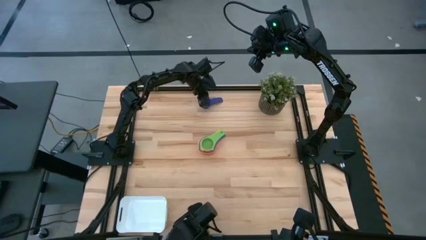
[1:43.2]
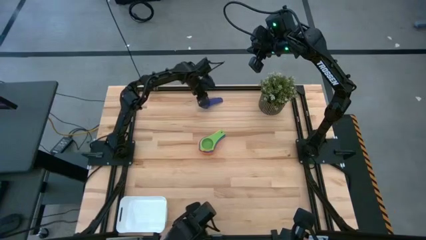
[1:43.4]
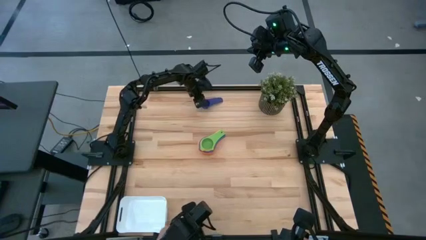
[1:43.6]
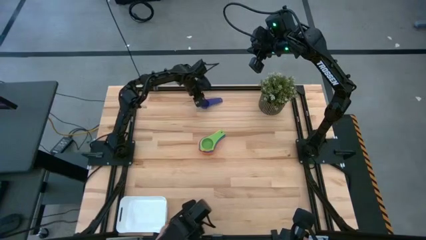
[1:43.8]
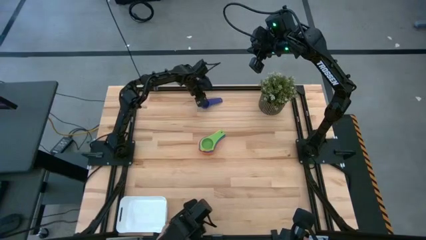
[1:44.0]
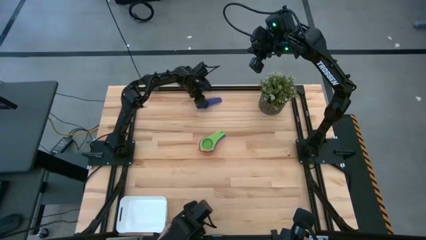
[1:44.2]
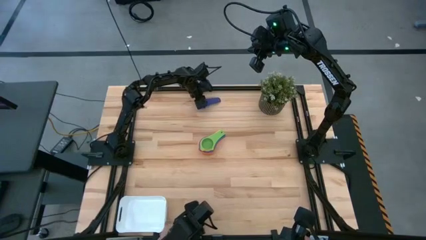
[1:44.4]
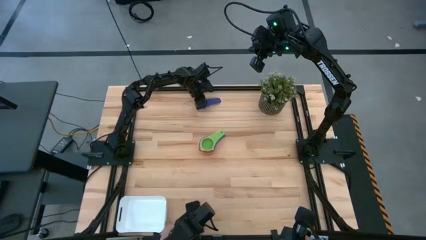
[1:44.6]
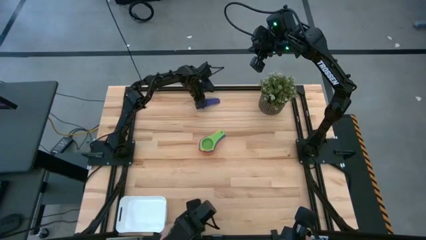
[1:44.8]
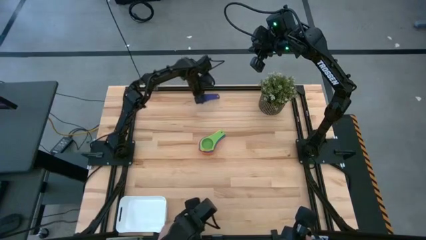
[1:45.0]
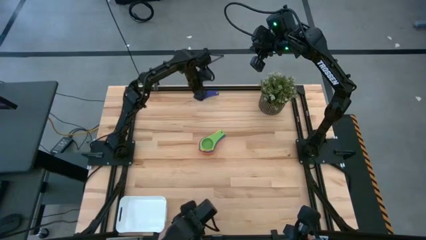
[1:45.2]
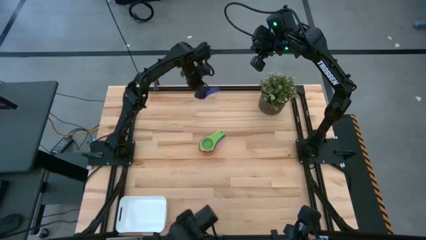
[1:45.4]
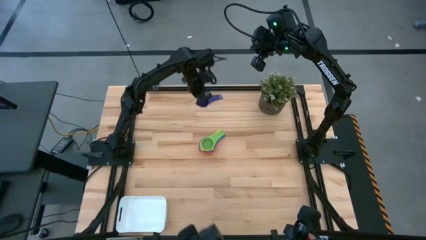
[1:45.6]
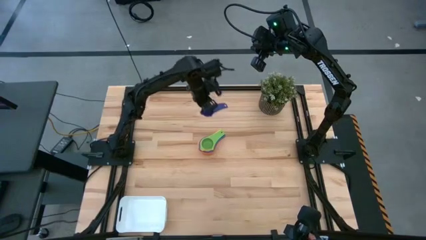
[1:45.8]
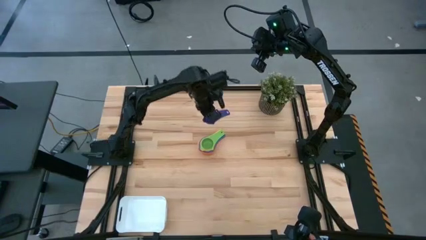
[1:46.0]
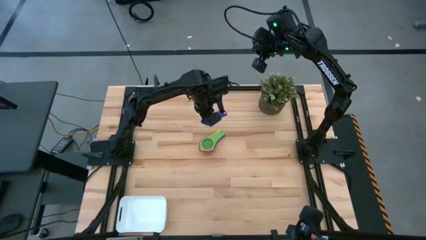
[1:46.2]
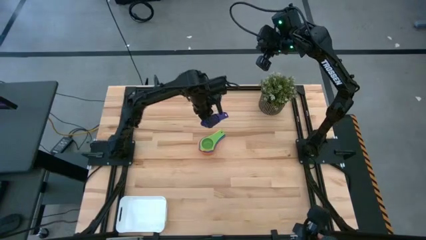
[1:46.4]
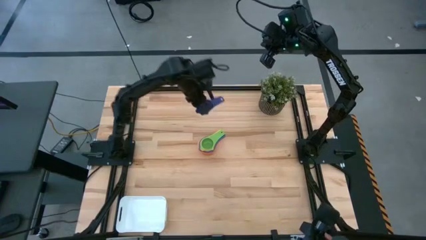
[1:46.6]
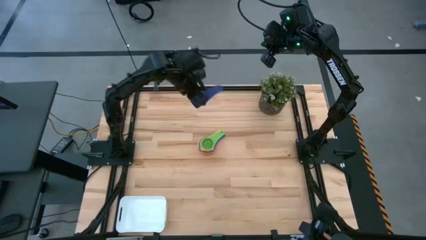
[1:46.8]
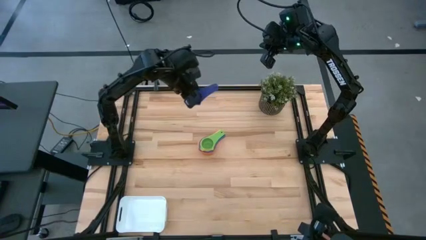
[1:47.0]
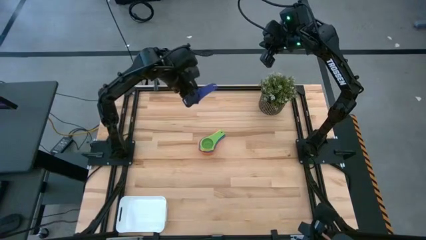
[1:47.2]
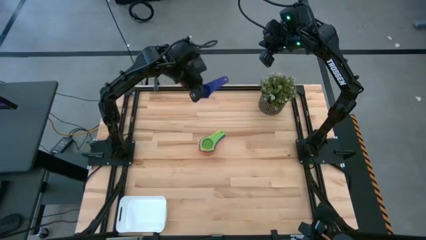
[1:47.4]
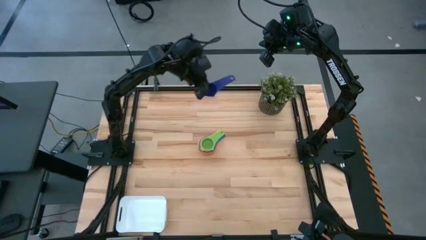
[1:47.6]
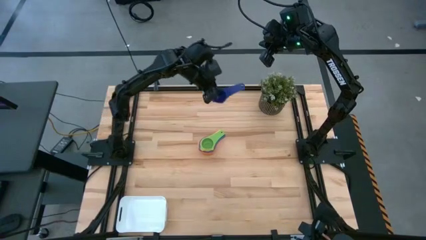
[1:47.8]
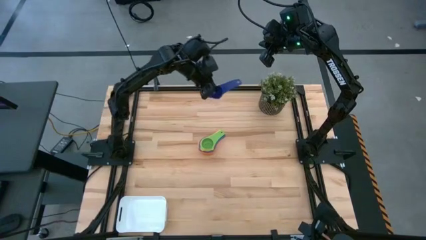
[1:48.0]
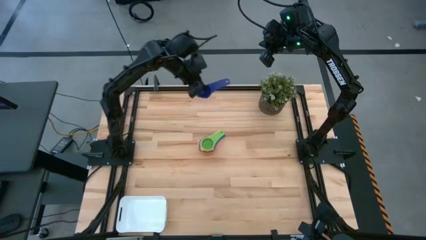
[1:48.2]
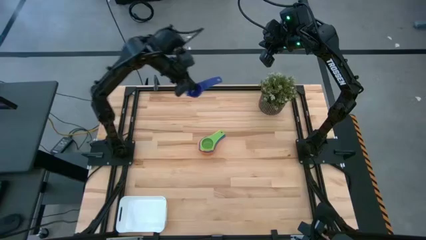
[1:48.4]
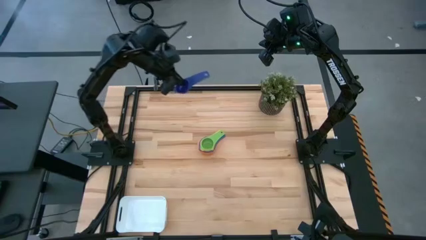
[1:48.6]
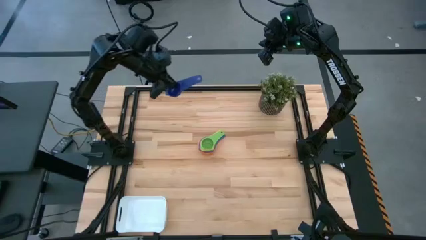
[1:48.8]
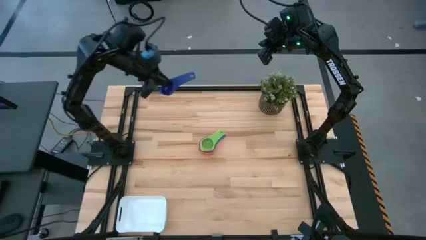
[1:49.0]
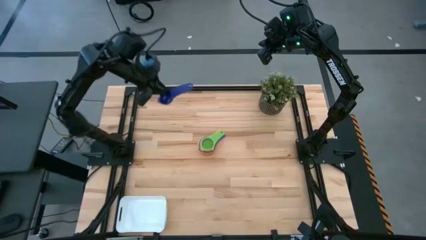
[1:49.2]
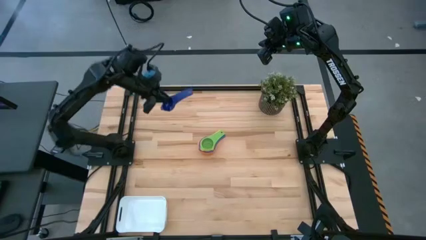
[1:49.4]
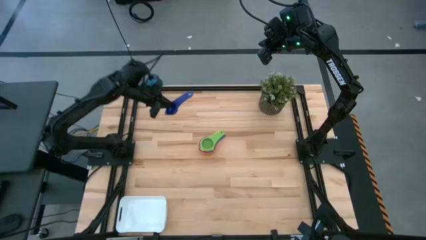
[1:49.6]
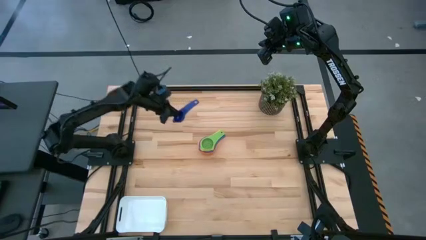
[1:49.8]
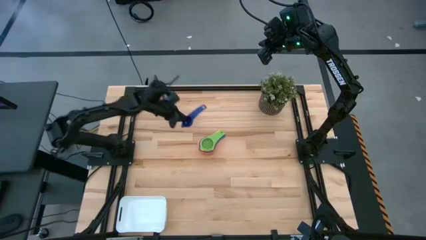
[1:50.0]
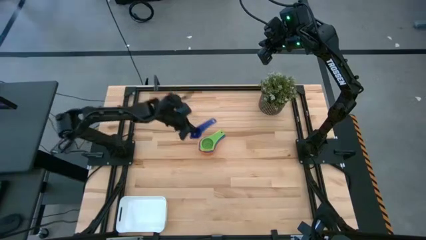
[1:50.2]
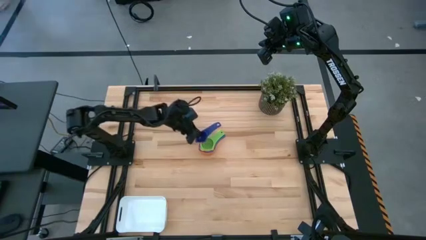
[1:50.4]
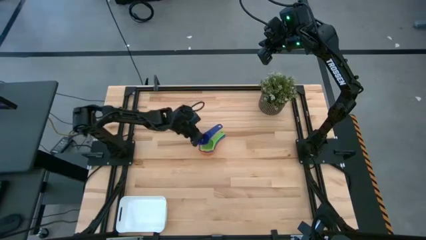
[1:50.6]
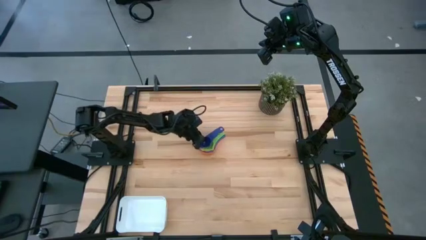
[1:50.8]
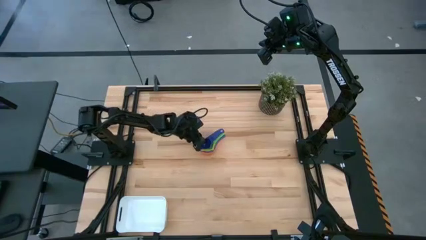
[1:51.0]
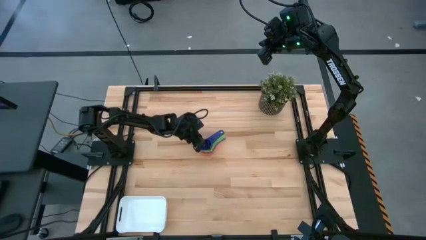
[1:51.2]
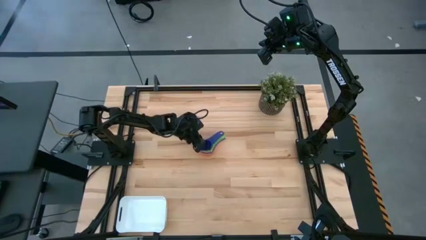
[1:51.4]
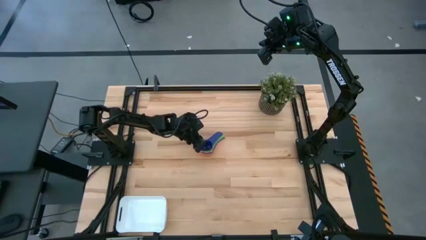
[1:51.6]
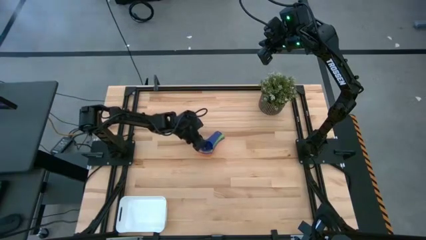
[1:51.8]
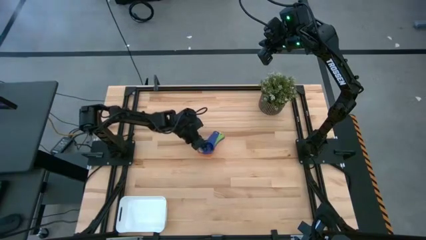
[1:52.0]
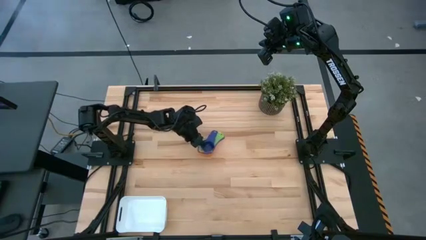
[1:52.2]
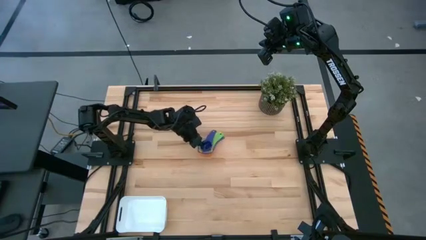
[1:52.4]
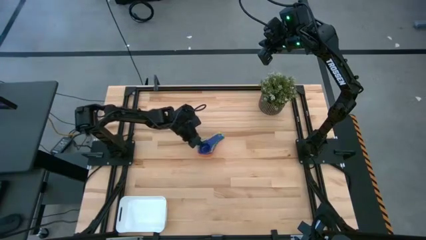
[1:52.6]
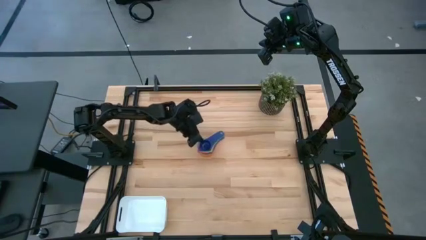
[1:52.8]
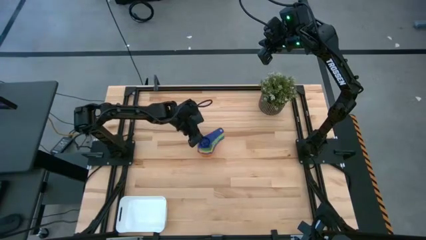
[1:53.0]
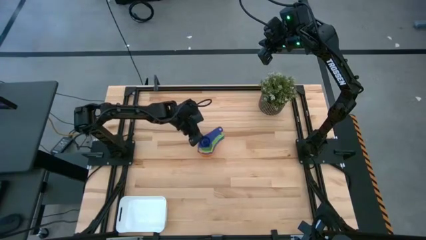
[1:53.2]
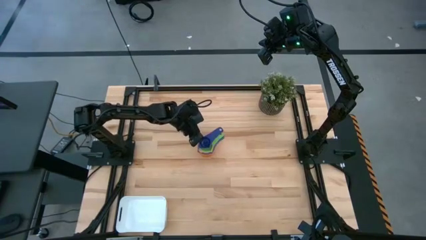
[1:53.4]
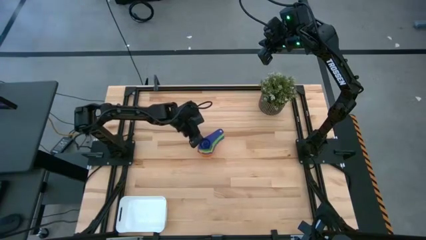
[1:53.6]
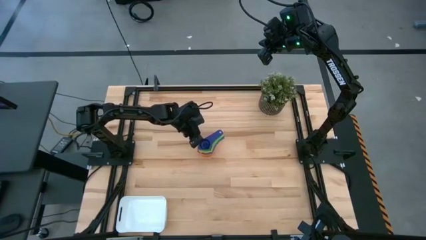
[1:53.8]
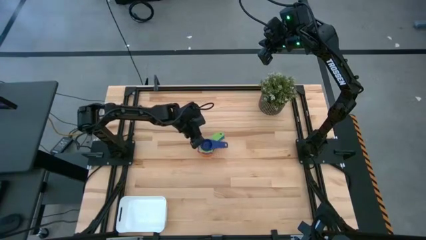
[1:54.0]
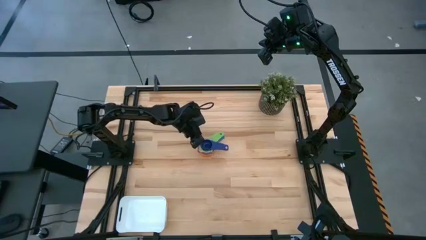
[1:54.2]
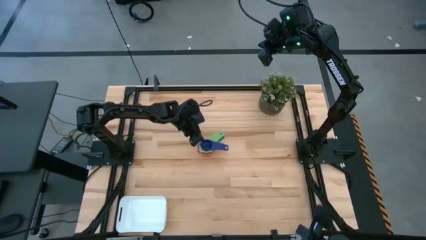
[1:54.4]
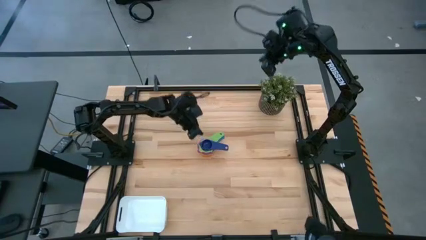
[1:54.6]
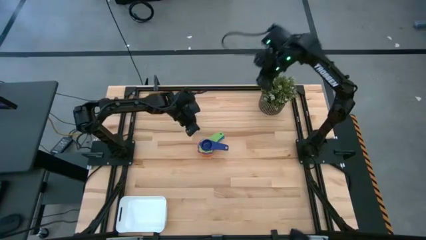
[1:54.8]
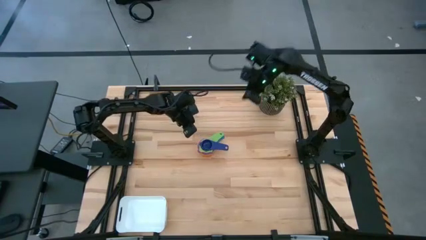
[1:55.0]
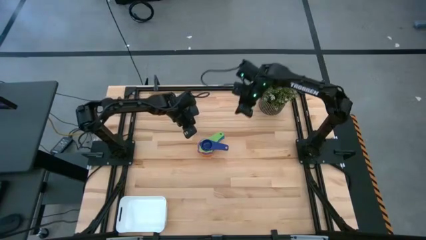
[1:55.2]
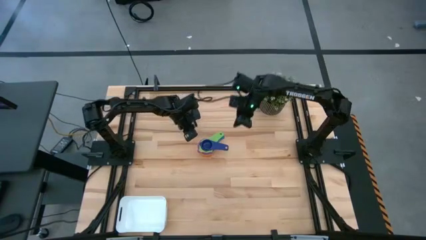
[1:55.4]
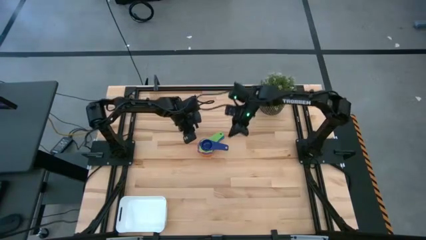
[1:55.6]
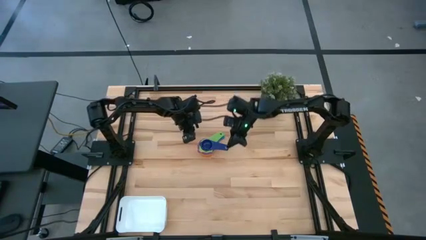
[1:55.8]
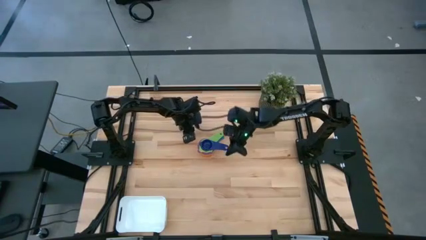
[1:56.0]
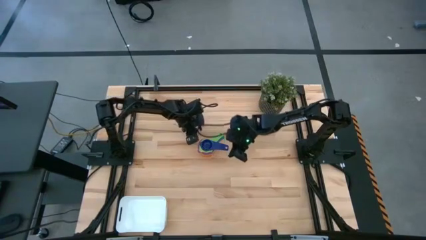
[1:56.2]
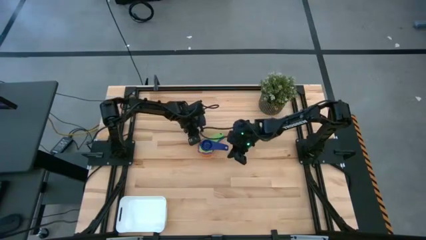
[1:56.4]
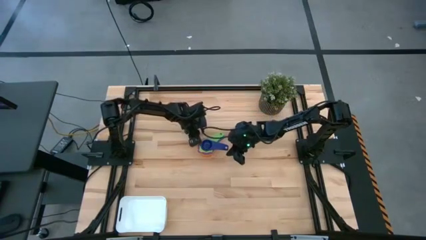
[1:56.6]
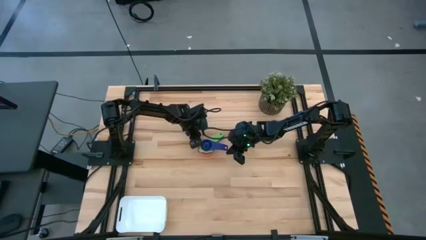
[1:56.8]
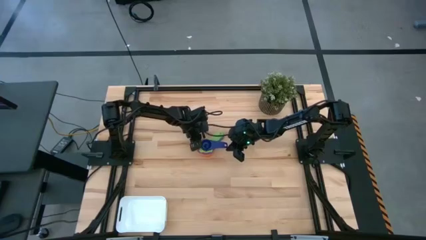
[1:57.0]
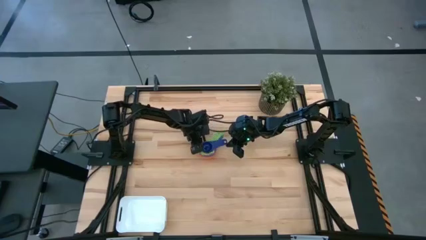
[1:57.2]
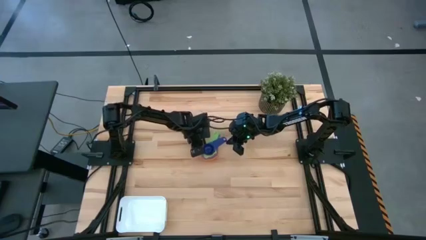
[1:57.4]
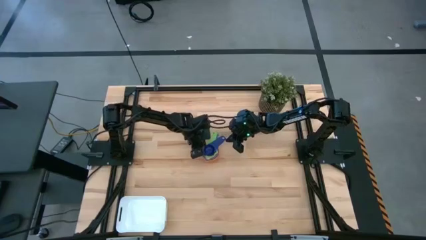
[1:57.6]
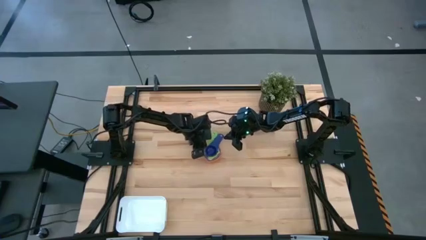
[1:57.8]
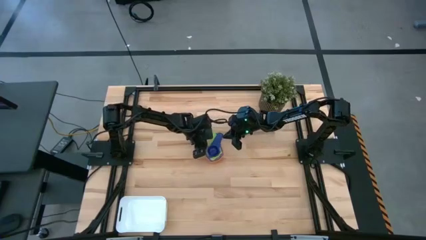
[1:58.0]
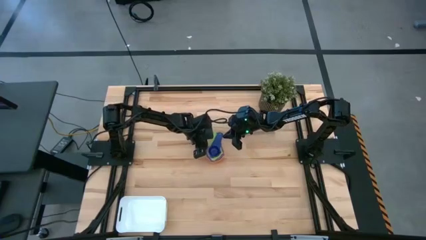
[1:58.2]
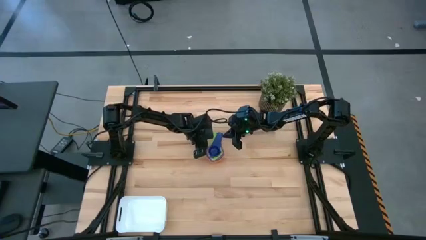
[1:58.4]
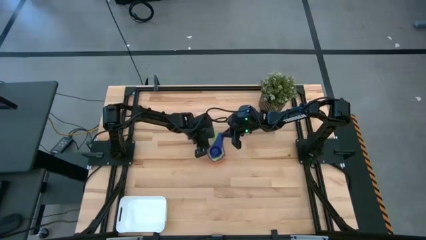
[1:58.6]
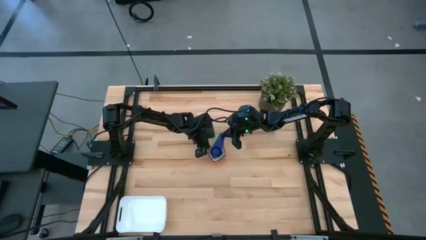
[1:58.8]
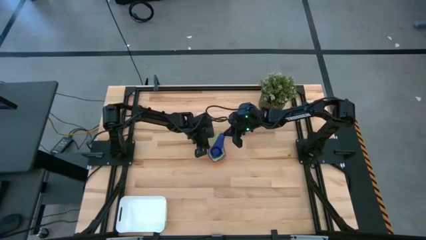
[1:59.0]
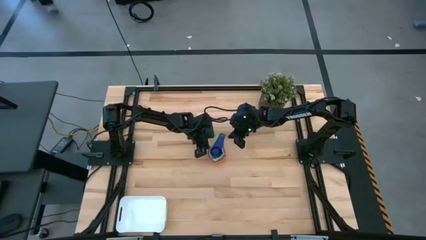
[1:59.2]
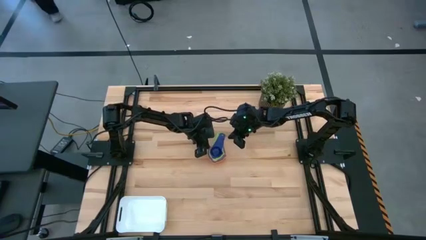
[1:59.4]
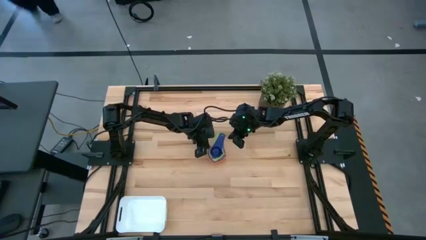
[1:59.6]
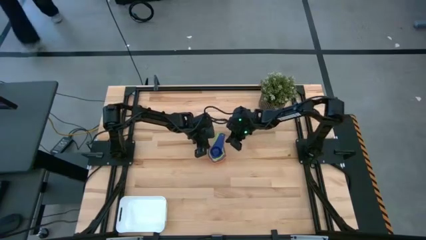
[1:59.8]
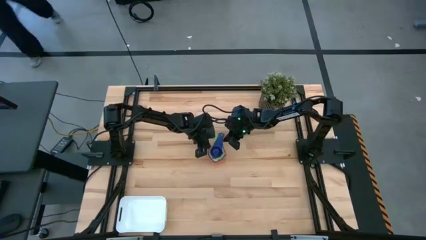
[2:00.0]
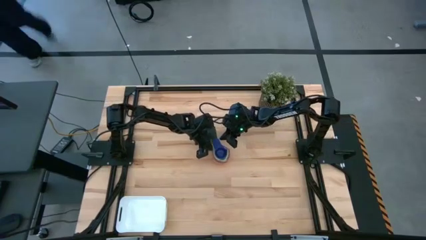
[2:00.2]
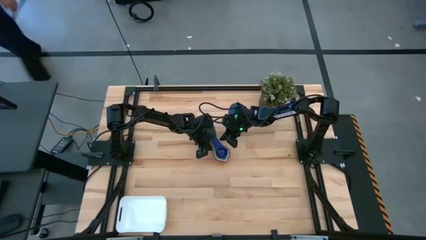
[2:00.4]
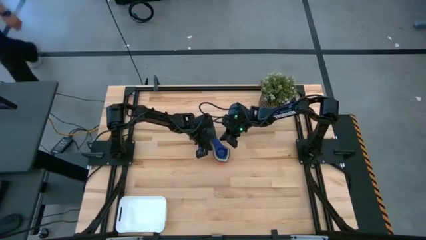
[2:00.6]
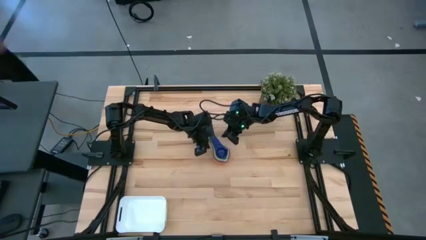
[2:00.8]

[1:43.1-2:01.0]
Task: Nest measuring cups in basket
Stack the violet measuring cup into the green measuring cup
